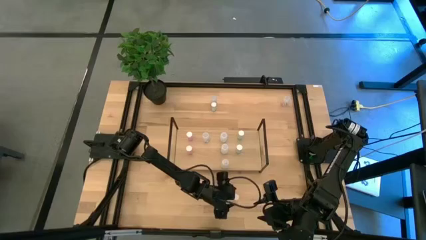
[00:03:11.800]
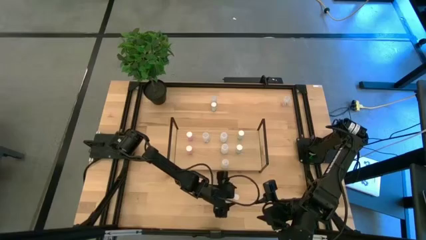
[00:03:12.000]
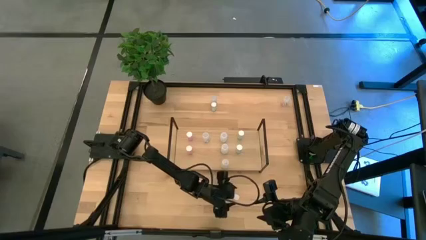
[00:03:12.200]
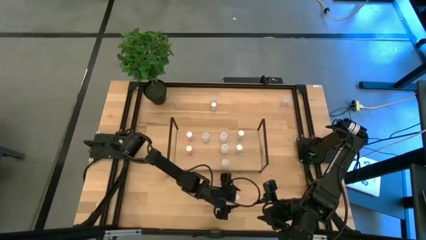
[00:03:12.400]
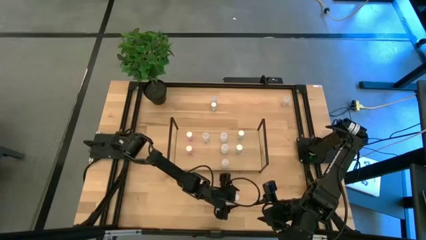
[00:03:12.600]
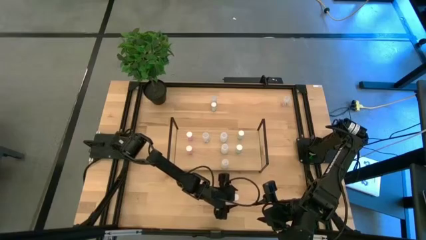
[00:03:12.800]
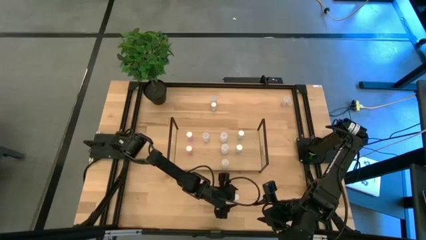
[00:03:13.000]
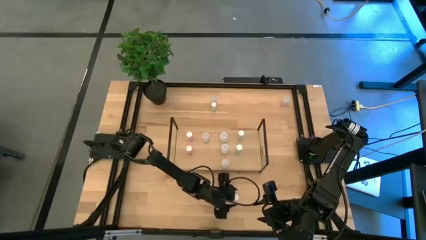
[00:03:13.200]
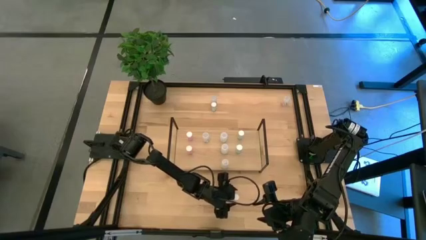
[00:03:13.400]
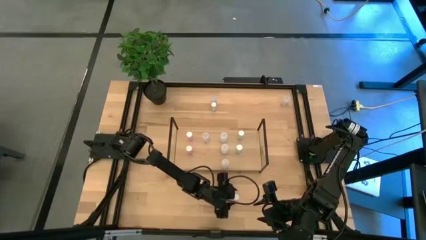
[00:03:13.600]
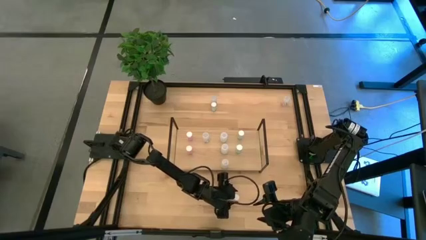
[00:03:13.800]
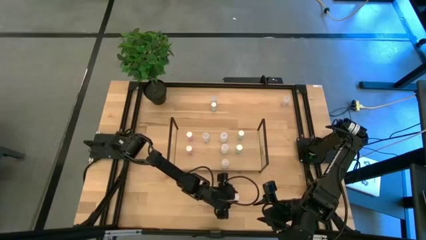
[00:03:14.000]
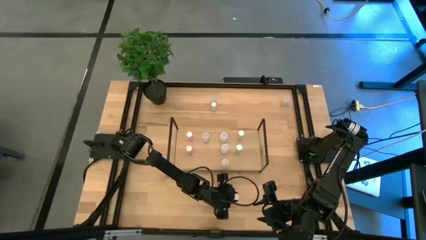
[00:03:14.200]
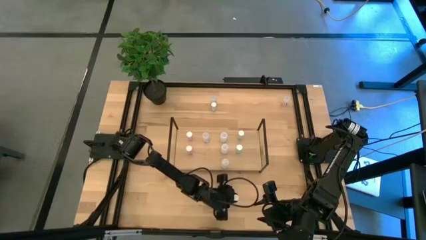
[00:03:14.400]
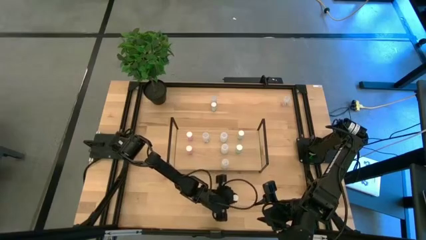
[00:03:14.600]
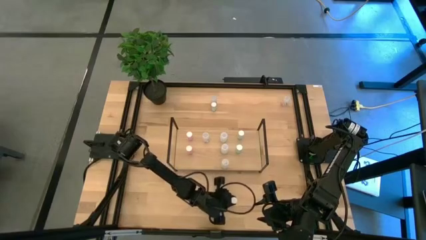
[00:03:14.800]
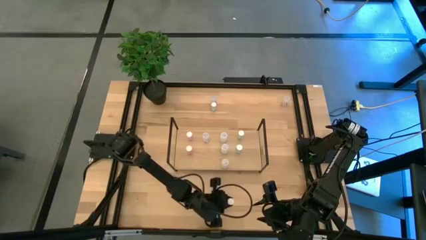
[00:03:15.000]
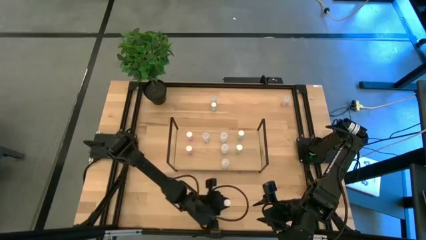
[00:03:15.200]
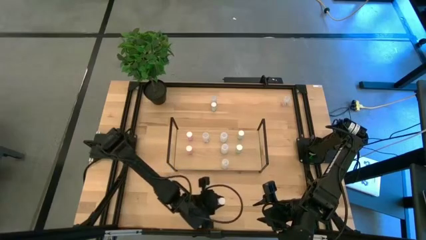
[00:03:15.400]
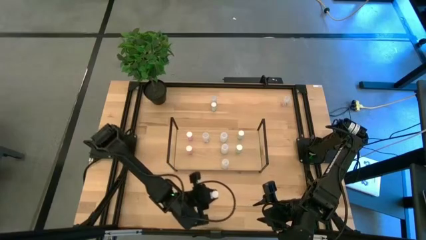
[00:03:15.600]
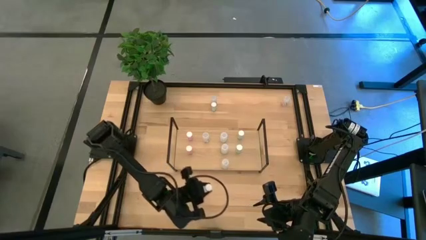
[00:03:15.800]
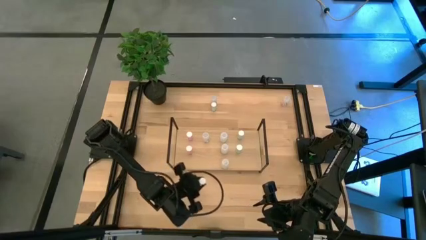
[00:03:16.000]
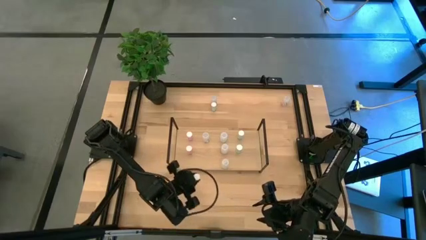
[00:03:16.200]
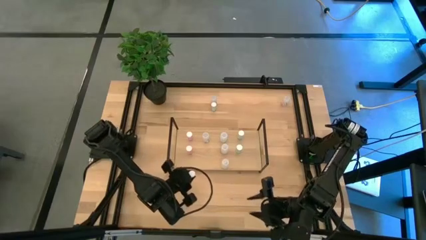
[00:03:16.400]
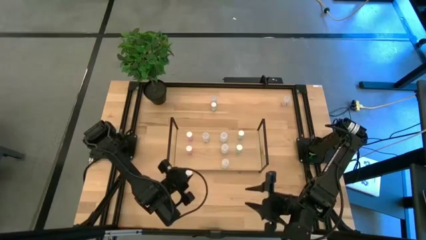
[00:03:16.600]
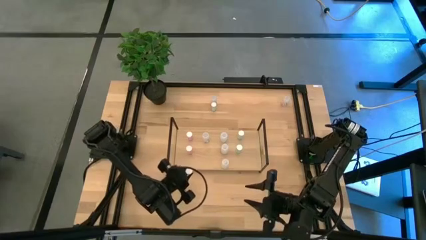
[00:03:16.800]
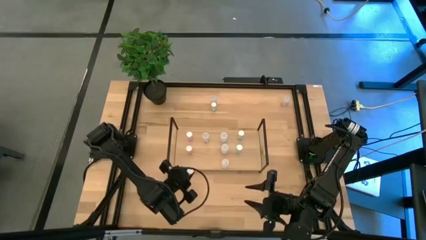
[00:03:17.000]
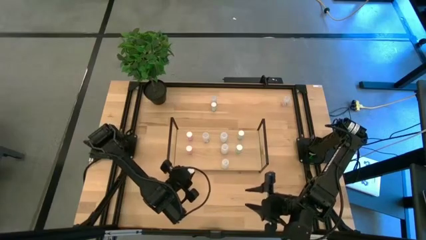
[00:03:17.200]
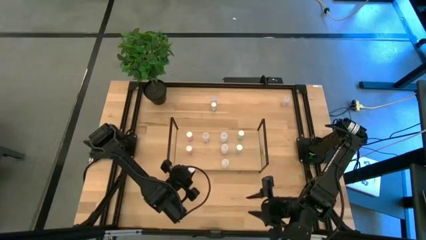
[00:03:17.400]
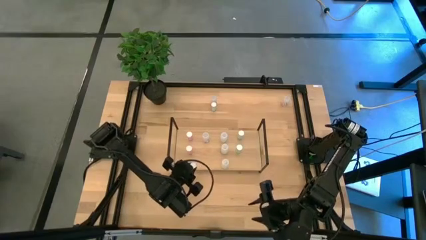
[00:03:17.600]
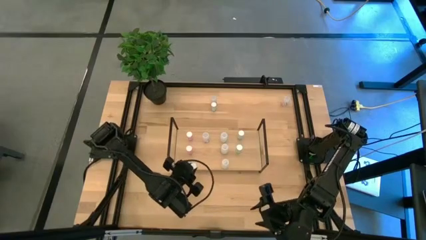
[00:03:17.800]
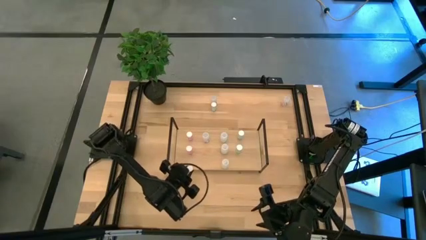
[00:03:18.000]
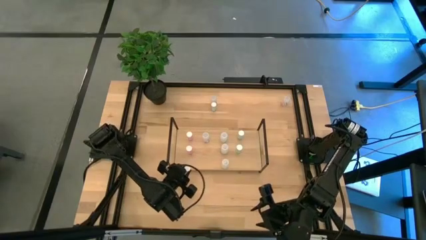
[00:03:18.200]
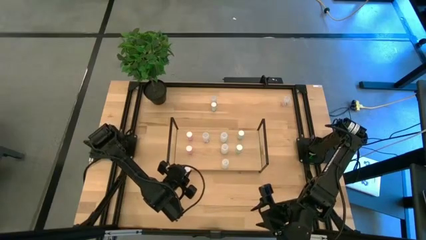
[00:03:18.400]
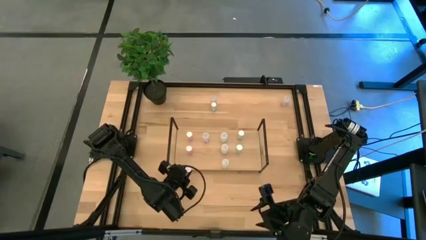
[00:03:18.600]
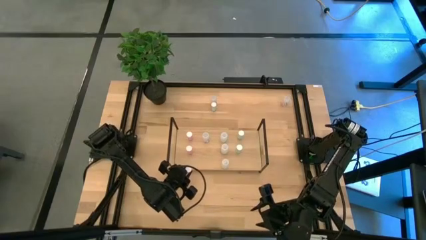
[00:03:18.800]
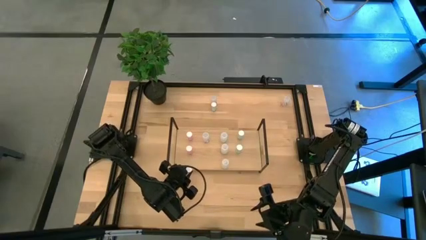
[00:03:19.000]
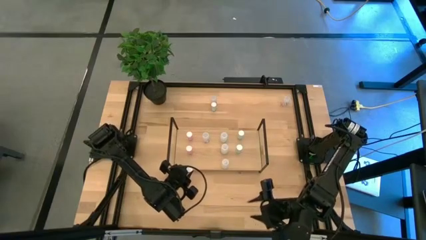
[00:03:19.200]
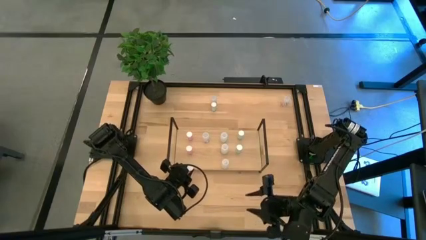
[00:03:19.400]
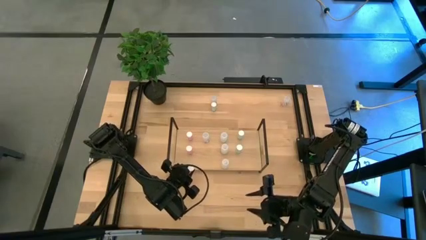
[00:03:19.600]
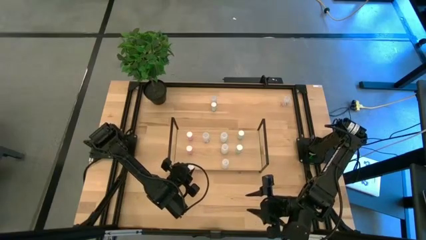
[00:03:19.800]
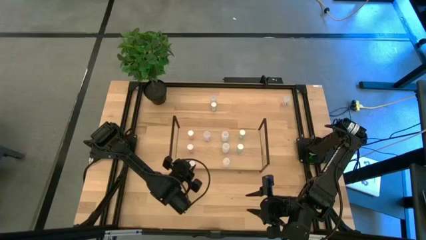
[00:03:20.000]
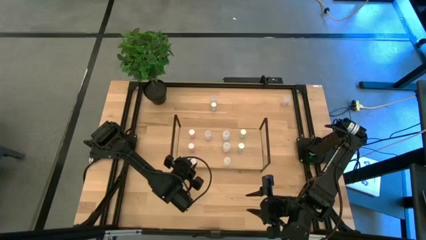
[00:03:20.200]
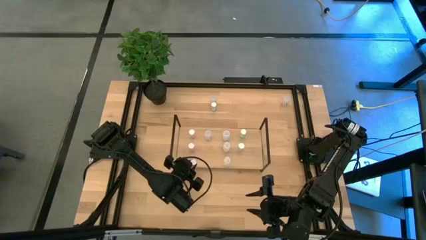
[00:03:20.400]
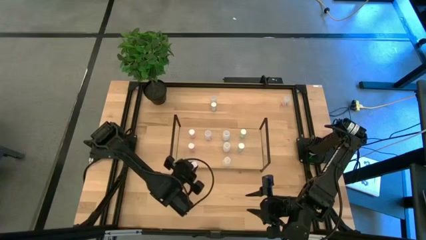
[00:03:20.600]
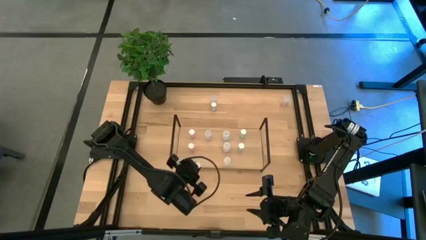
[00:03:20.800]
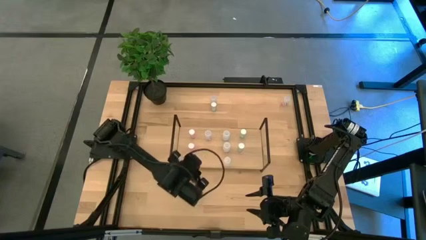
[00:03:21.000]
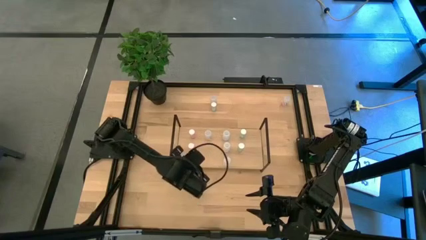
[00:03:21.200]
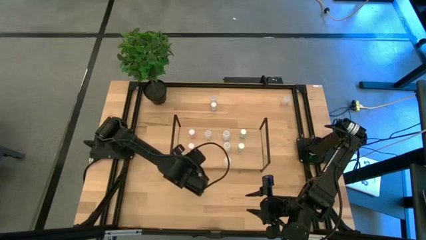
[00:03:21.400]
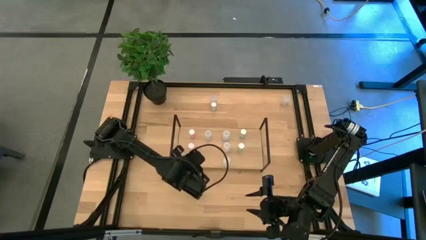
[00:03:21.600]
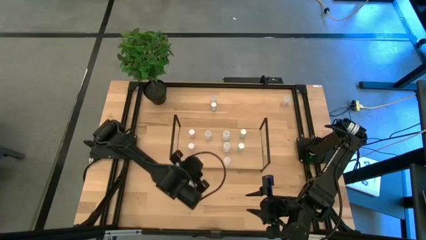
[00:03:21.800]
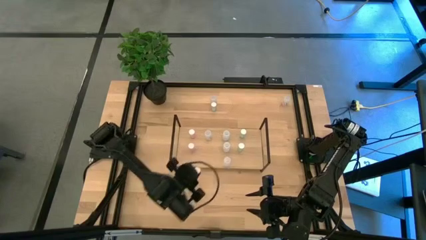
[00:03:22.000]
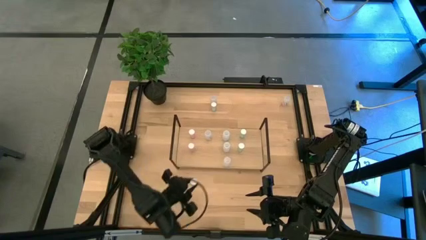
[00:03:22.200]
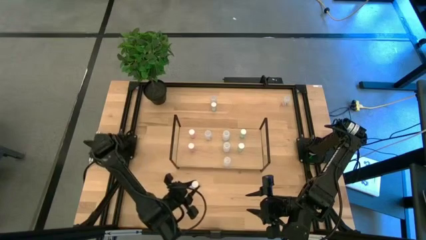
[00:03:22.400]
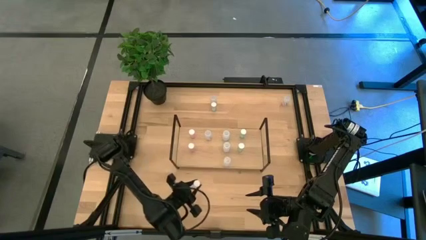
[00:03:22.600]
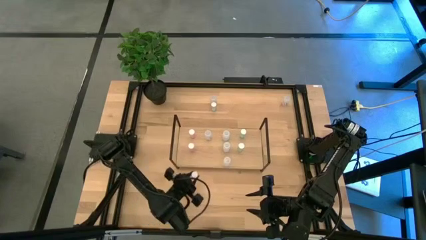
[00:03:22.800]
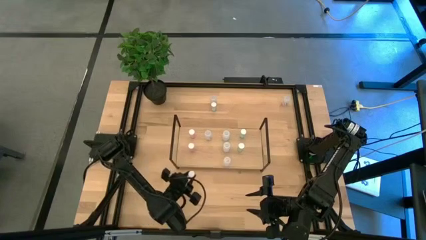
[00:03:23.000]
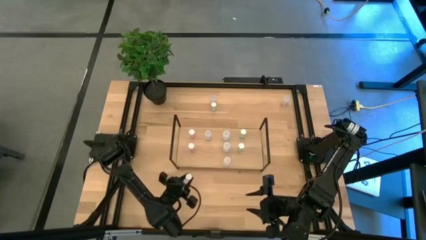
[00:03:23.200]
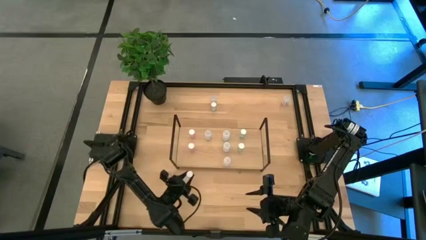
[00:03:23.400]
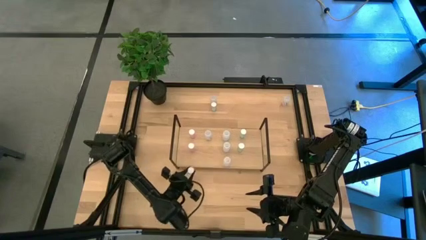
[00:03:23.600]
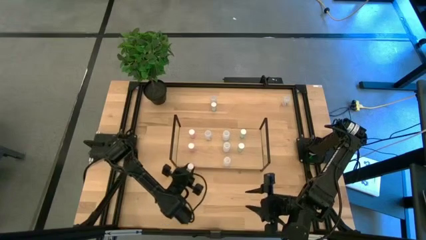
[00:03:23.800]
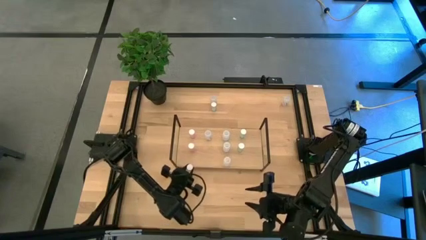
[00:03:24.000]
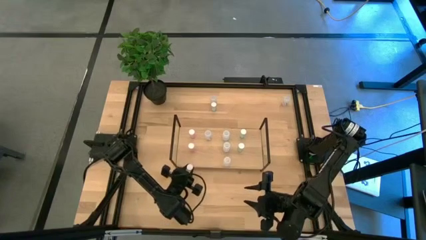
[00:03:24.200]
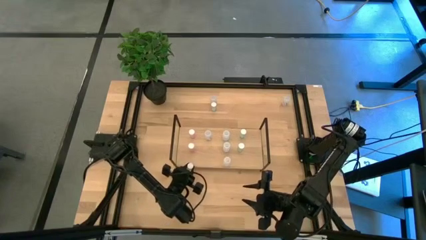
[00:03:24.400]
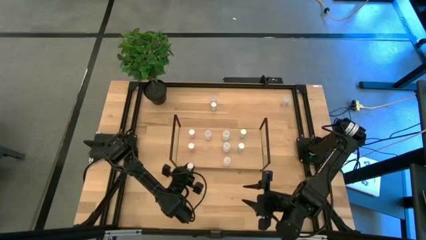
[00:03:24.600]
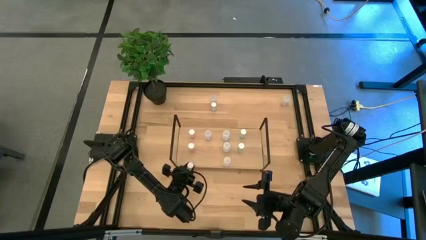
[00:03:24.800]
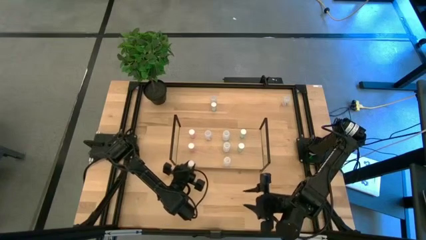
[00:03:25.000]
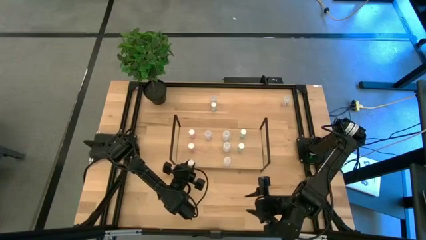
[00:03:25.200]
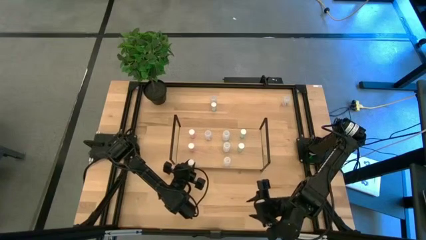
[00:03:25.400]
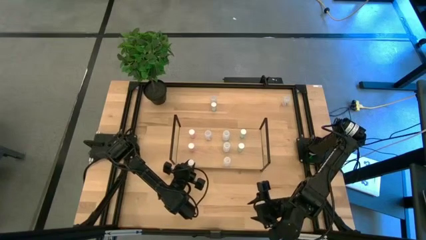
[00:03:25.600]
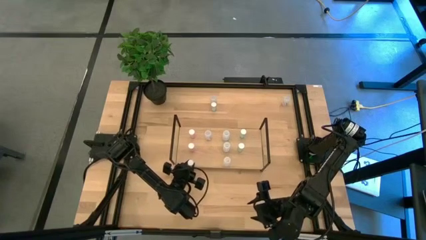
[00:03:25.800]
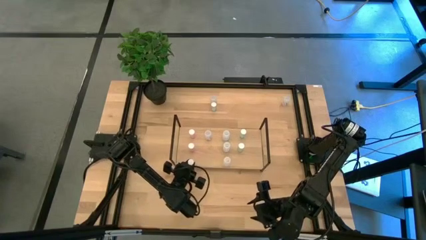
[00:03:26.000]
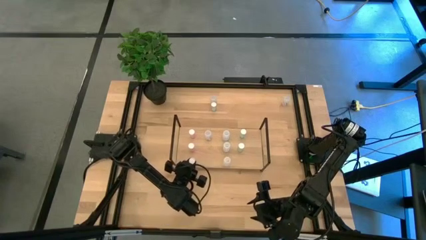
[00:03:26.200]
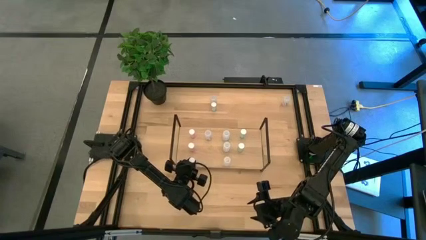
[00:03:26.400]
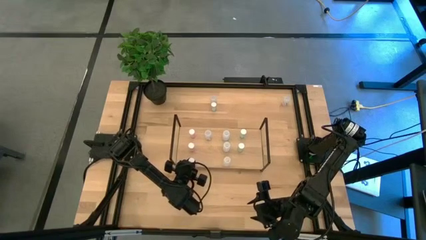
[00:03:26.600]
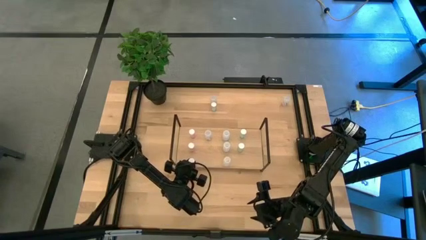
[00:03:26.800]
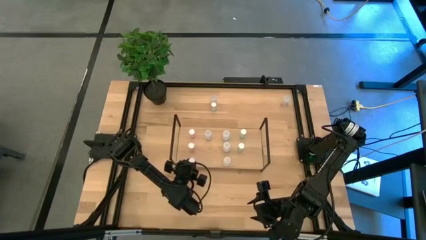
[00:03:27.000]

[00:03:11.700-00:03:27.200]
Task: Pick and place medicine bottles onto shelf by color
Put the pink pill bottle on the shelf aligned with the other pink pill bottles
